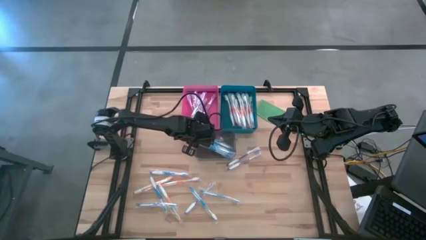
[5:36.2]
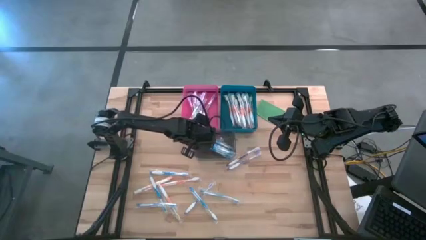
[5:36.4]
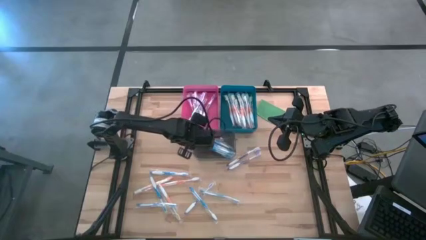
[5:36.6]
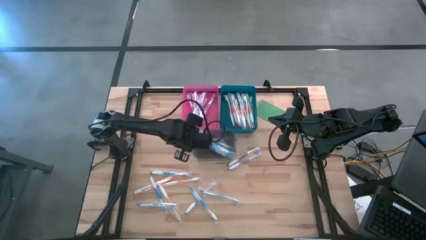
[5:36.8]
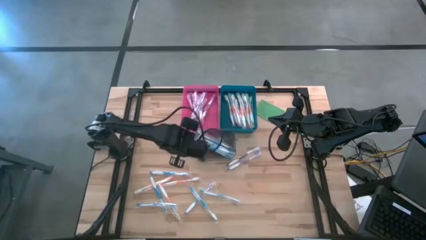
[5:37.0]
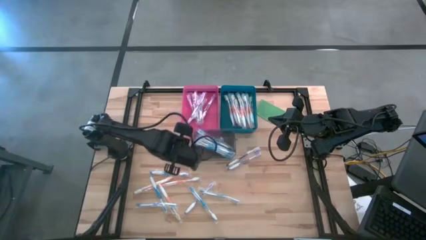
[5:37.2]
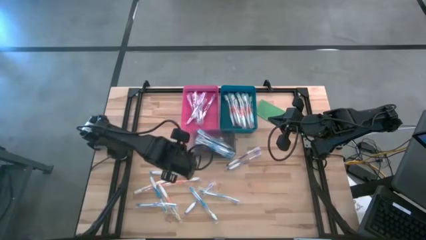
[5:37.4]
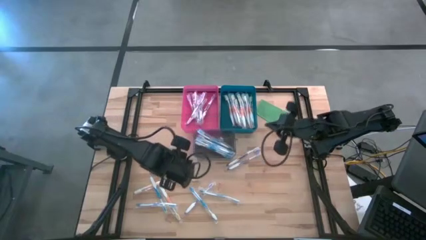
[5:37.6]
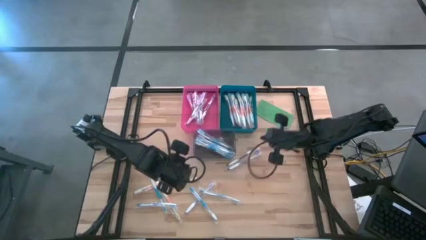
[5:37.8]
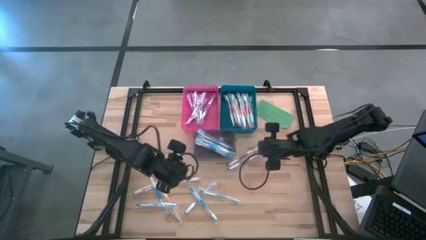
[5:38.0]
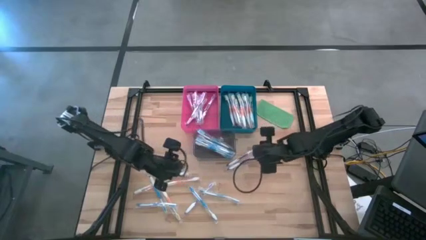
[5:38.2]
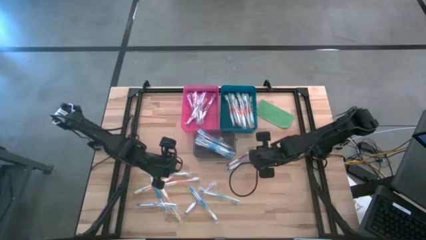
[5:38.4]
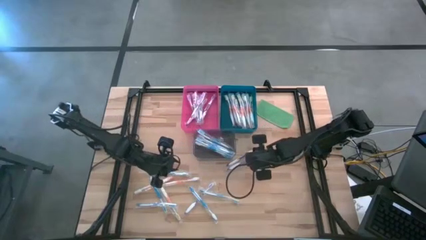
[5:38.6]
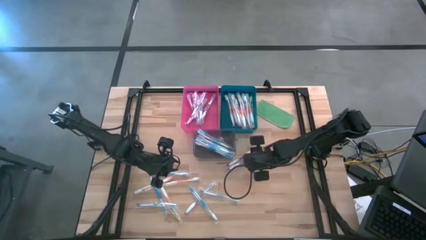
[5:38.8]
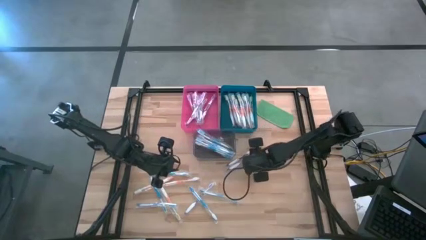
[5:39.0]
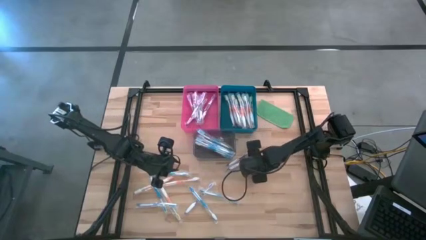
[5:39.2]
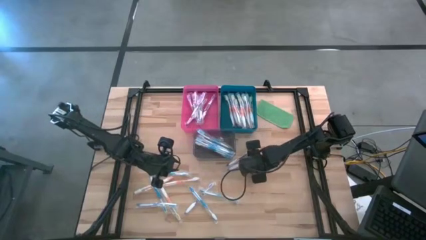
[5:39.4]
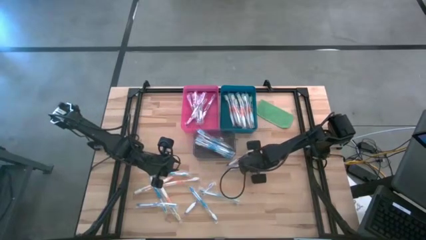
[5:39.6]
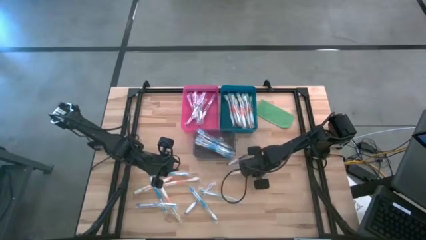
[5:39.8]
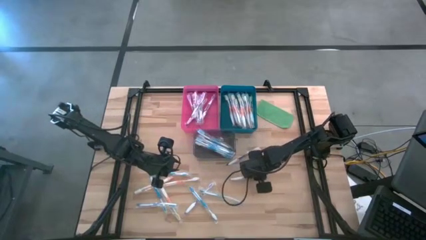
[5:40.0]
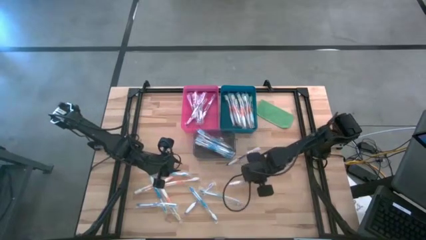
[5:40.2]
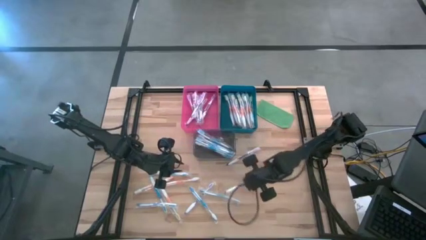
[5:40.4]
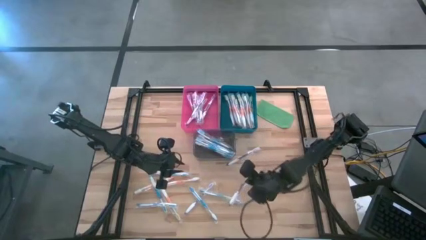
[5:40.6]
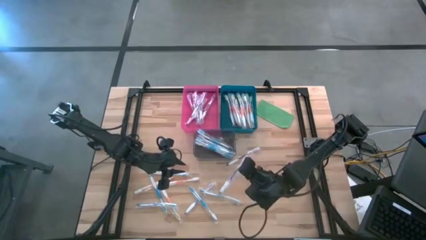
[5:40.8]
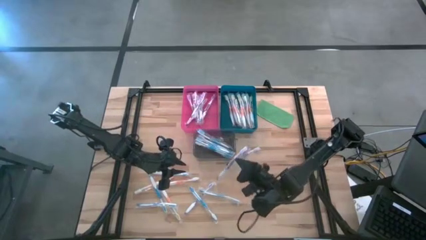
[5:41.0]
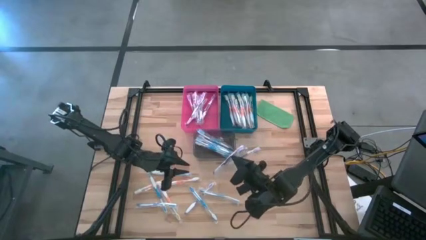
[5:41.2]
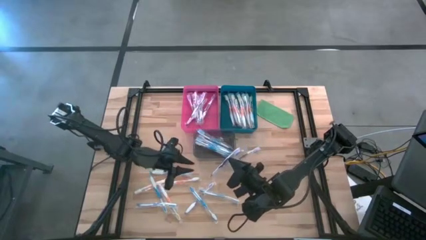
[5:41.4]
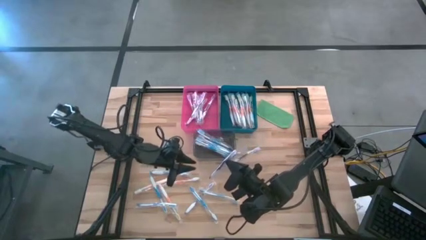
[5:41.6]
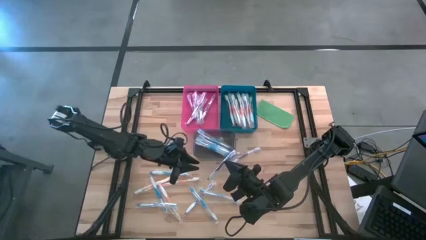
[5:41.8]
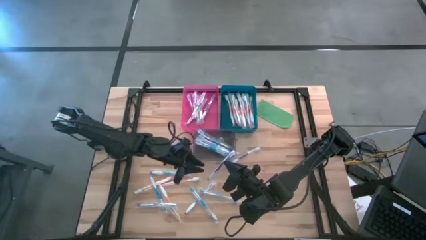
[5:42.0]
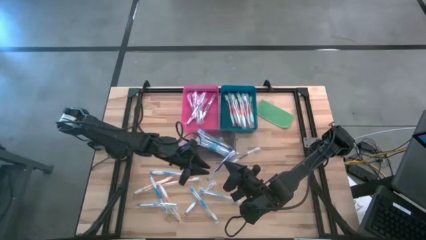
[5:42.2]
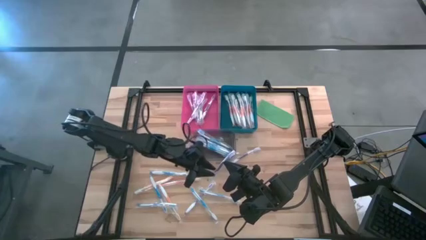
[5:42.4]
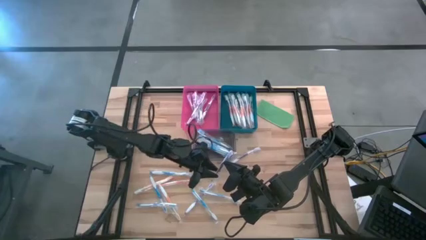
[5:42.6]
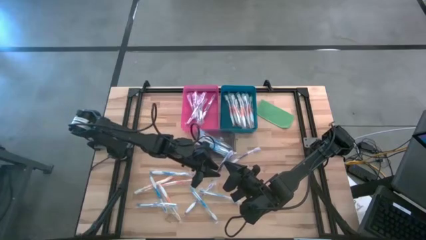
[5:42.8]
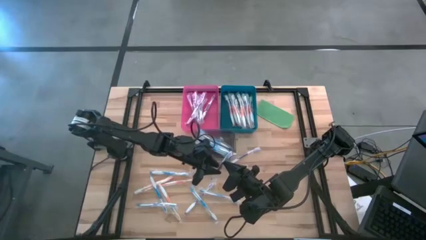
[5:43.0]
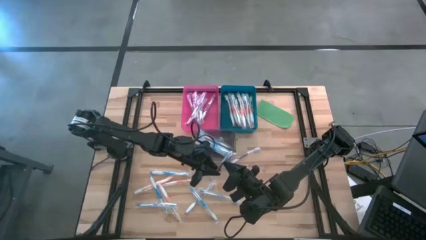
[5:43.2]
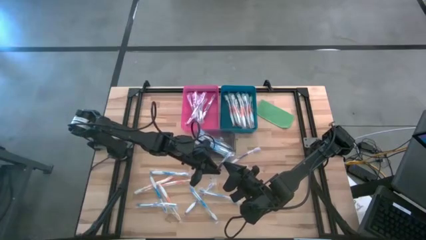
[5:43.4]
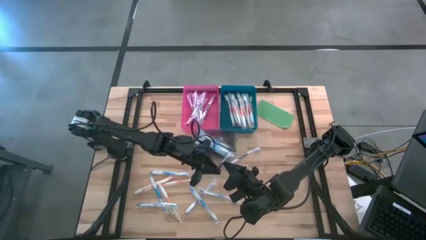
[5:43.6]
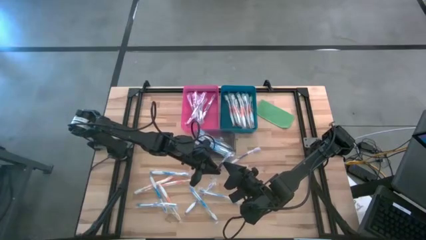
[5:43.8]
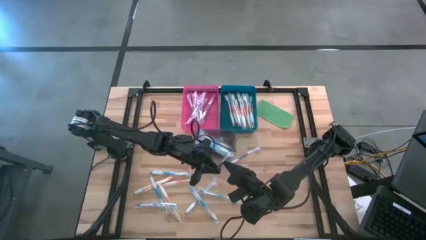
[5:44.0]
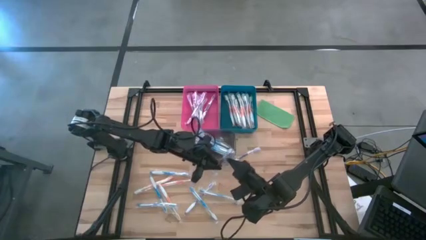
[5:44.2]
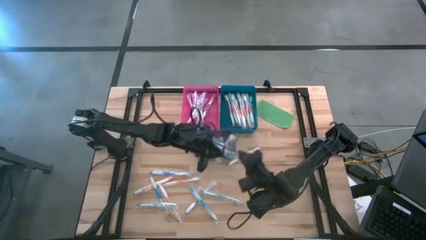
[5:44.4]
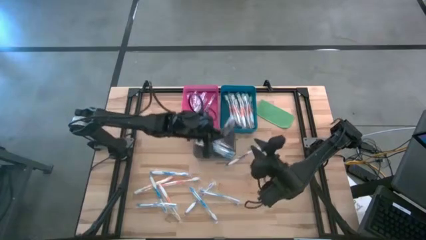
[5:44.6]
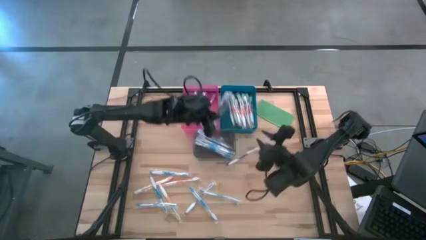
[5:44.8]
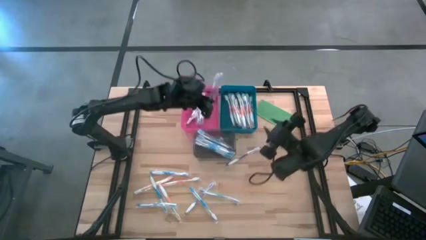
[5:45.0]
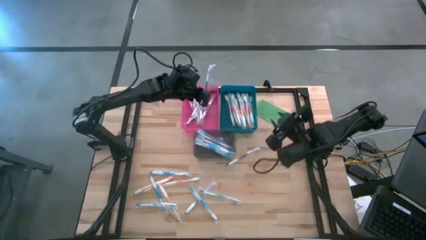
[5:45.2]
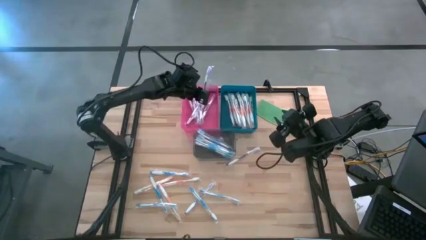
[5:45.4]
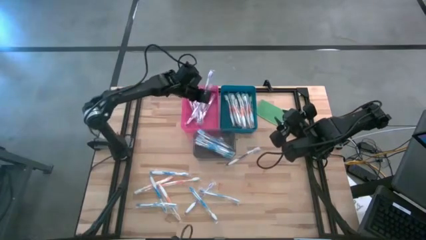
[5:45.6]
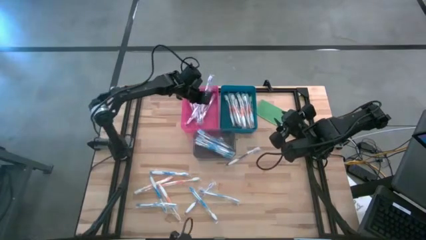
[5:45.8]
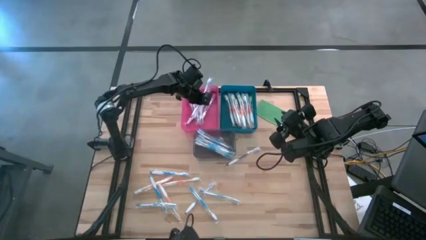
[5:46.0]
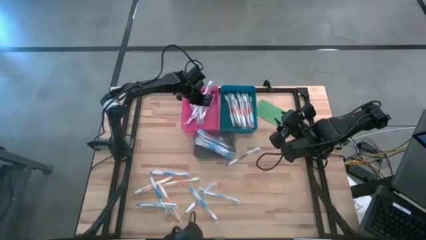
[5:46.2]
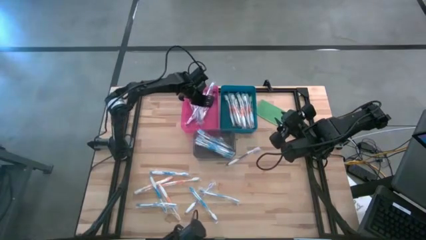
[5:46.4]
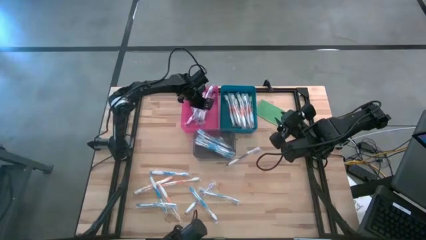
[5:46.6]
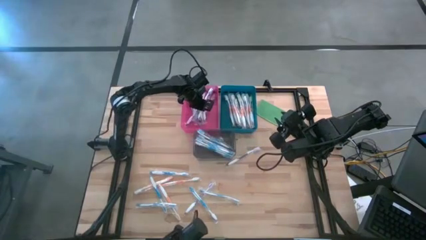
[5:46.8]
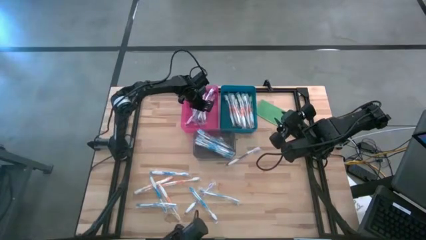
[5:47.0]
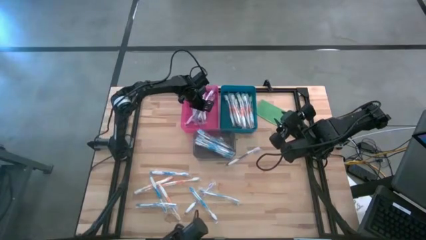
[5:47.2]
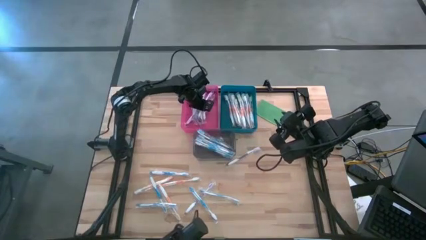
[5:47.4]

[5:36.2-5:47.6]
Task: Pick & Place Toothbrushes
Put the purple toothbrush into the pink bin

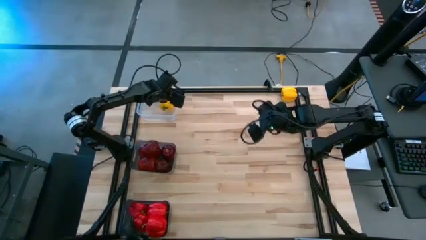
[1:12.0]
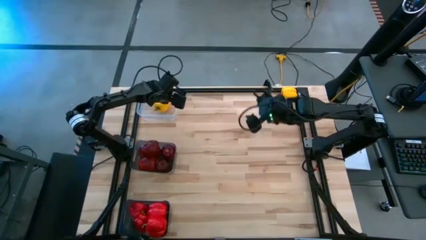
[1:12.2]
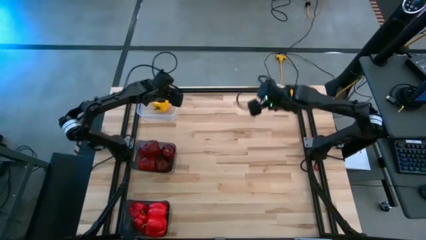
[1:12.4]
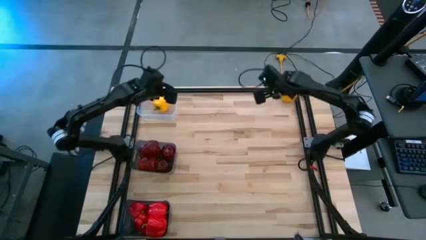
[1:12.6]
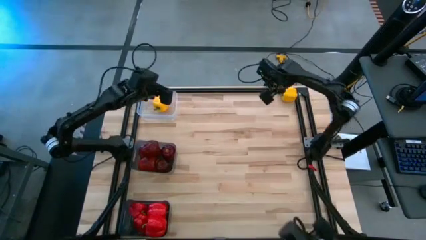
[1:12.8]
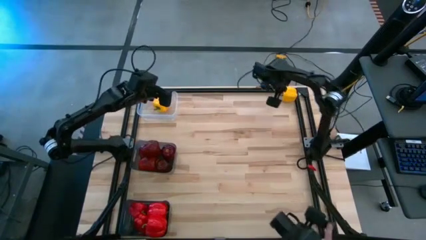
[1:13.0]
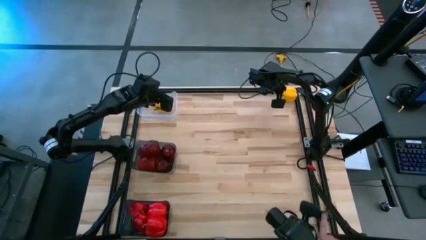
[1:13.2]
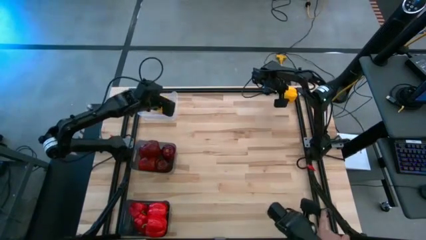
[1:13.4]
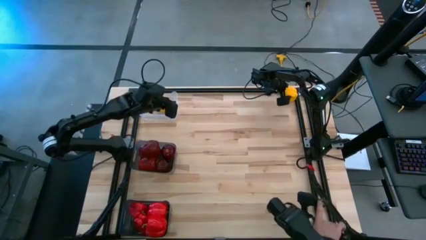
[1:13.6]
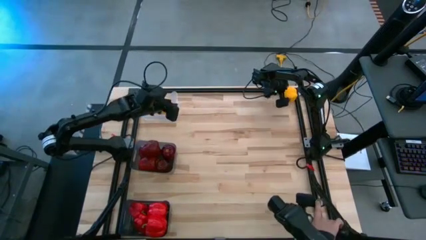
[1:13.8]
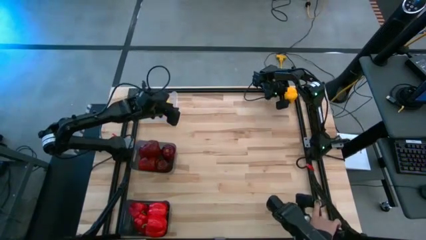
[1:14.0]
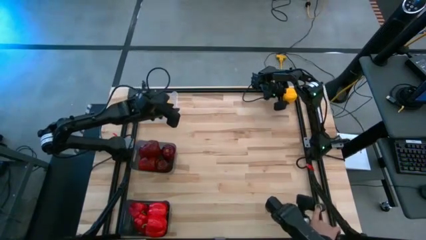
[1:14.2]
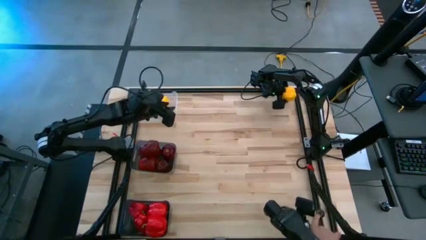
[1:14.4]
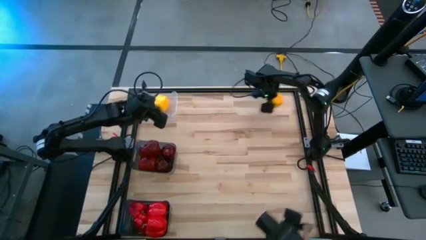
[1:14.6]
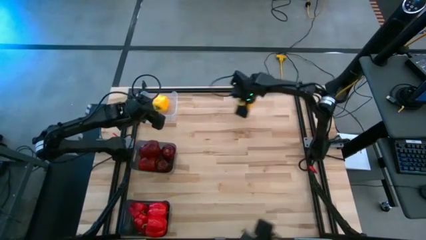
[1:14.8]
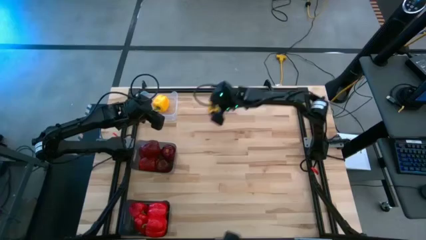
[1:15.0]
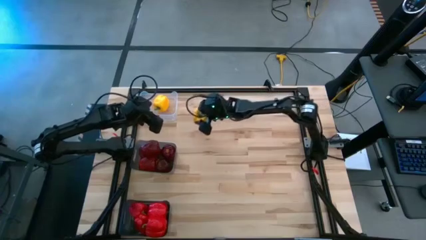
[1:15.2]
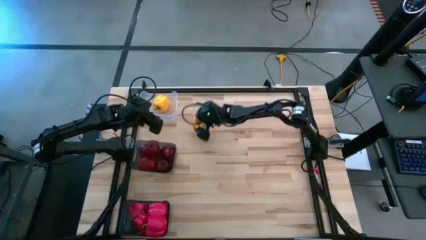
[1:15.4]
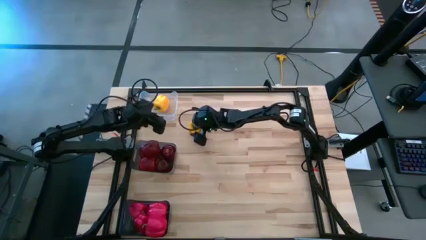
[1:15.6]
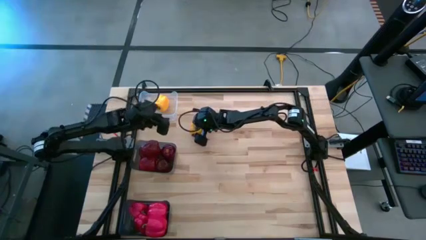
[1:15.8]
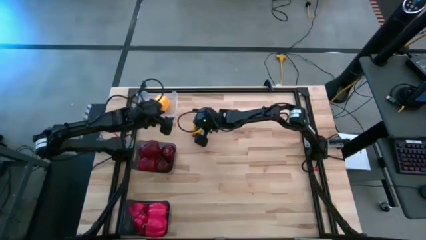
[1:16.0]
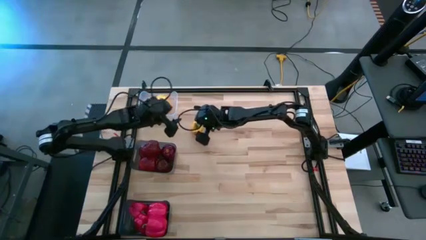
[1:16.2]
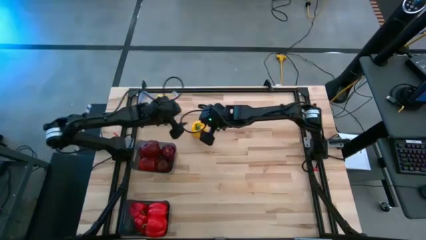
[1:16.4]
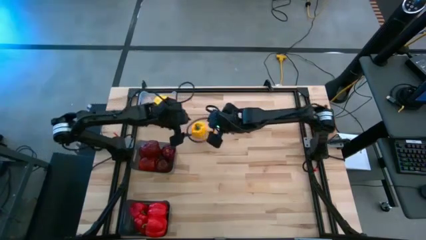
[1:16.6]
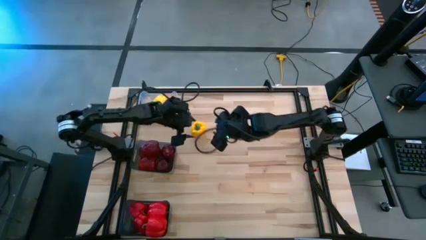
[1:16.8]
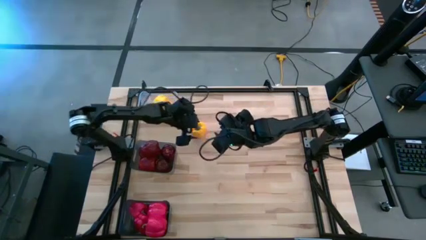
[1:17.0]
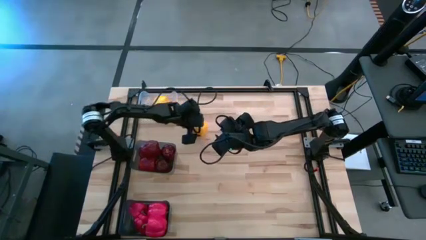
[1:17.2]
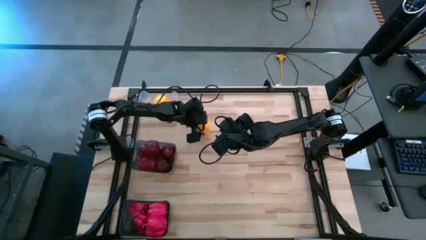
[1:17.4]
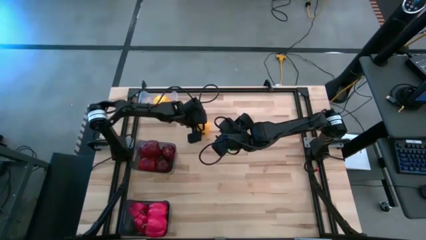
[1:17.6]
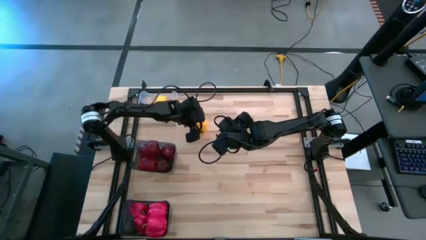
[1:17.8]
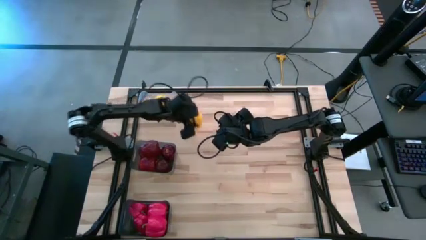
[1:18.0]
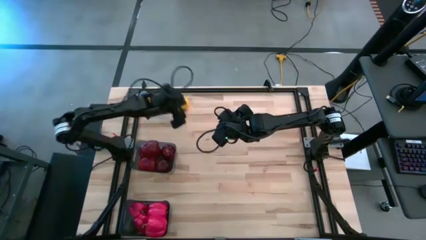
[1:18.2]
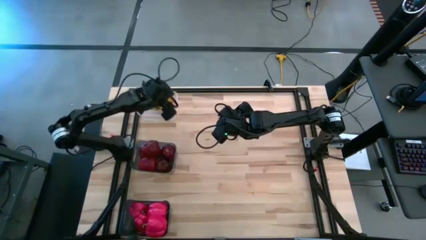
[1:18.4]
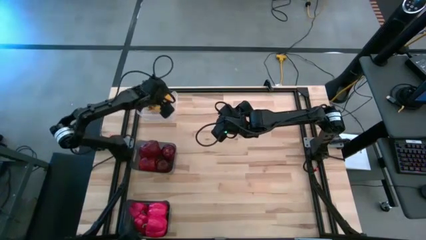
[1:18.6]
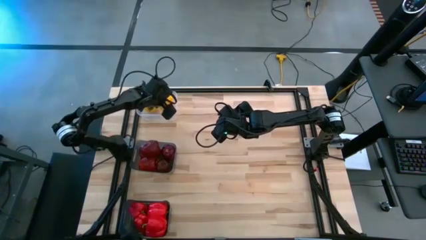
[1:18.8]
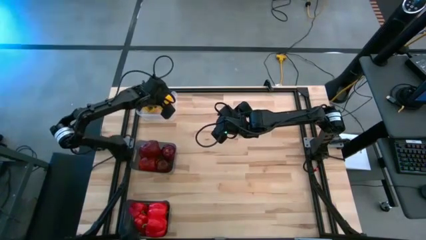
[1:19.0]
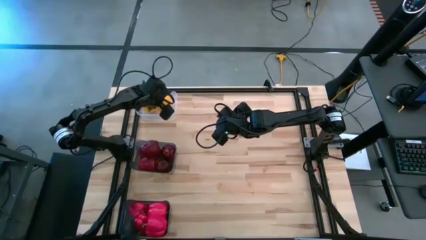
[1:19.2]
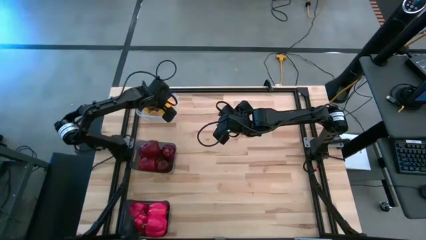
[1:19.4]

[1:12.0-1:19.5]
Task: Sort produce into baskets
Put the yellow bell pepper into the white bin
